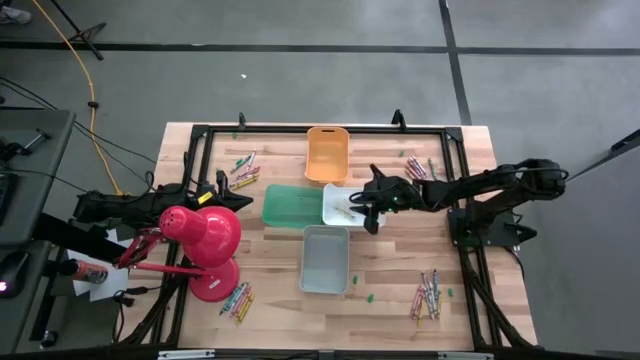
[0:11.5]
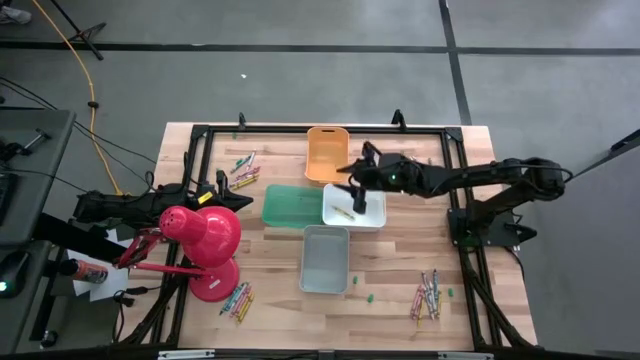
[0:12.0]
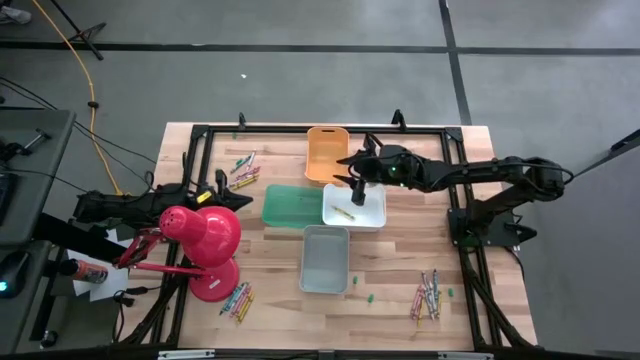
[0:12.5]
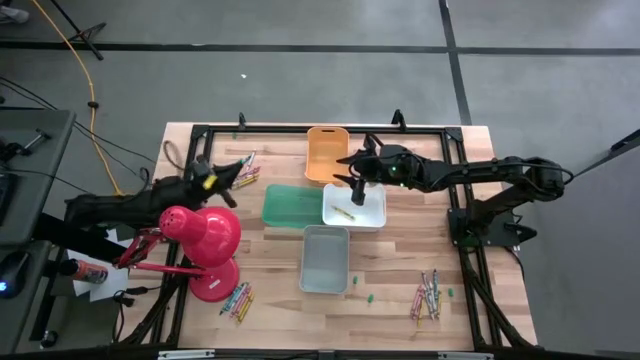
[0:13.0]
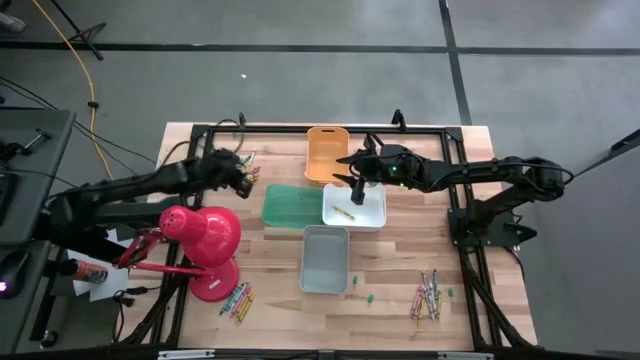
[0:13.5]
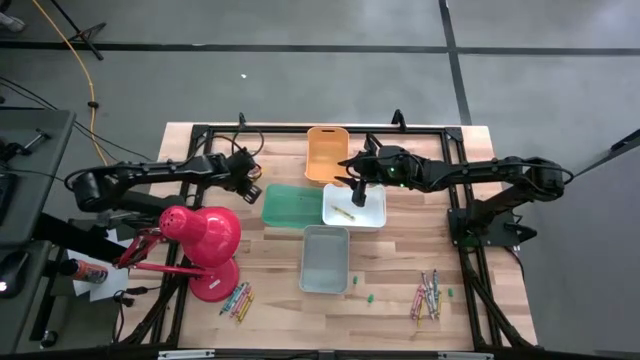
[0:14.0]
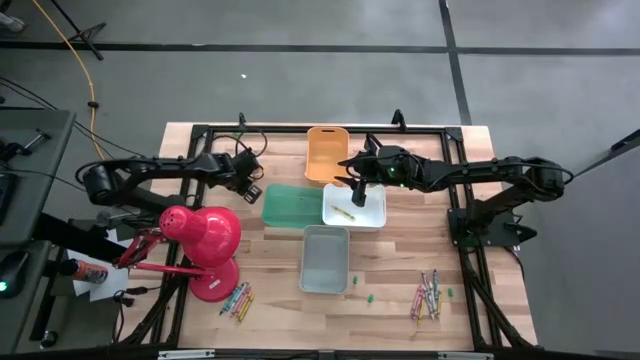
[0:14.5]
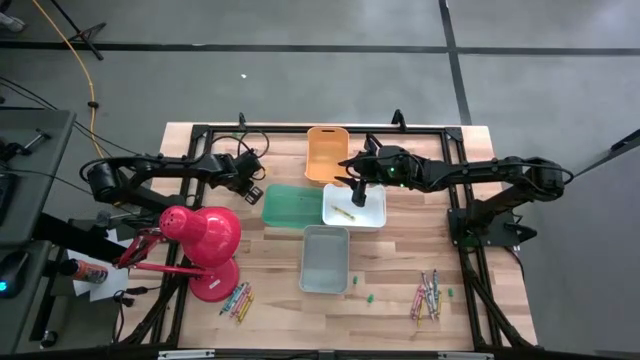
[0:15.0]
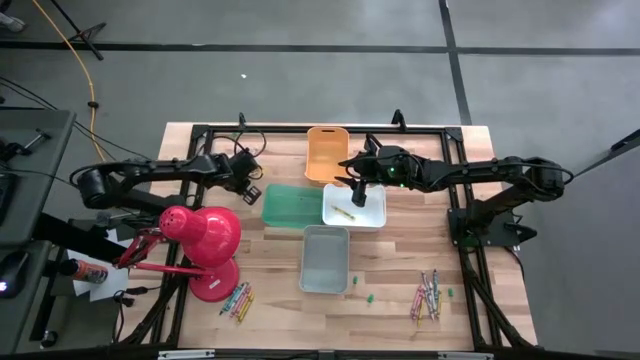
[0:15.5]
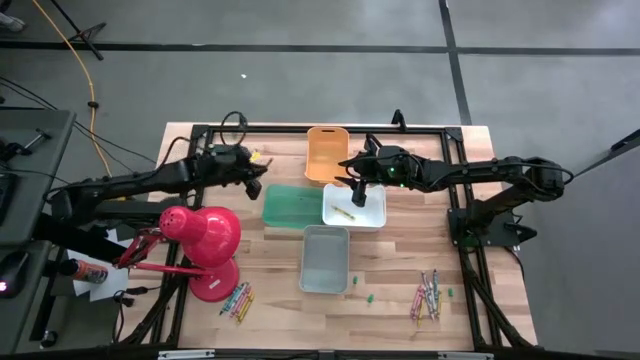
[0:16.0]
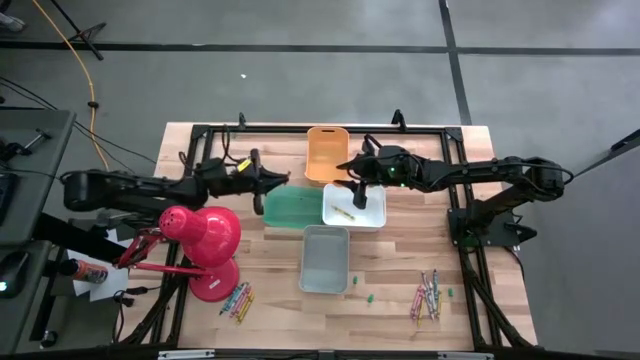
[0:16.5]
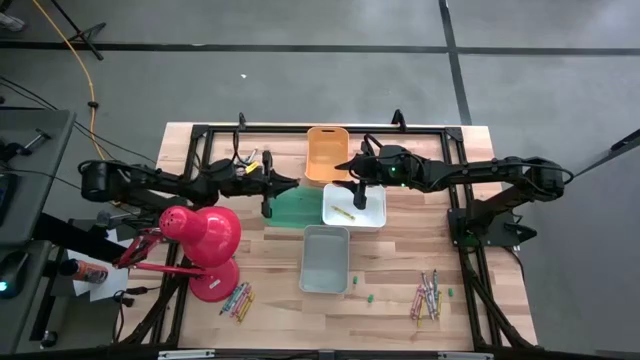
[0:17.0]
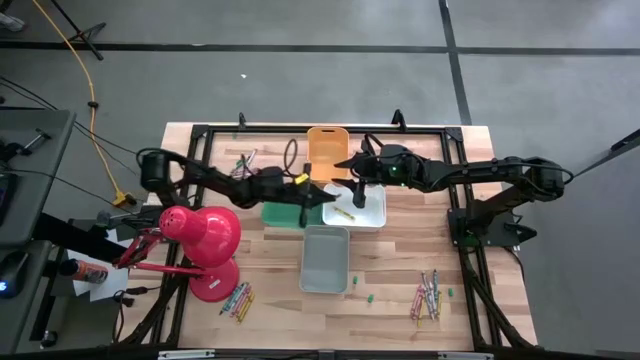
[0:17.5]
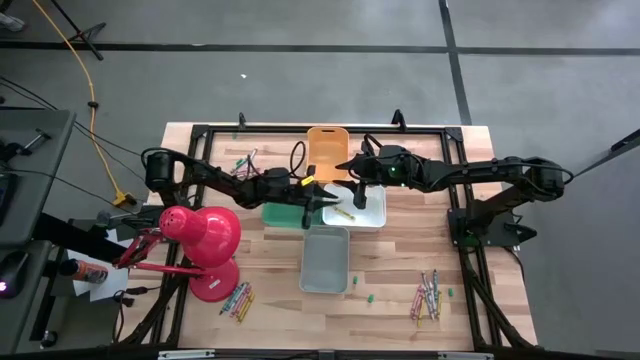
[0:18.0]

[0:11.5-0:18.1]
Task: Sort crayons
Put the yellow crayon into the white bin

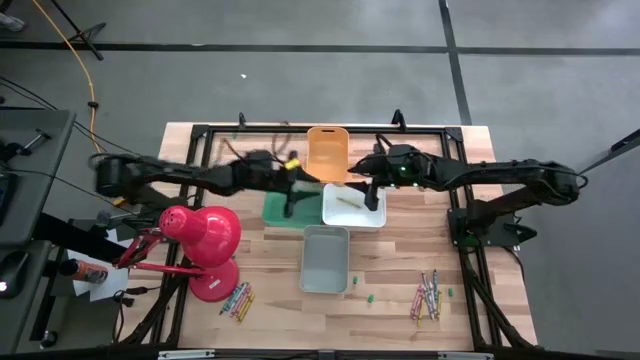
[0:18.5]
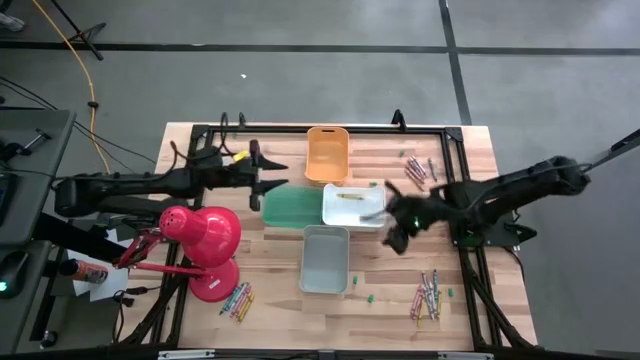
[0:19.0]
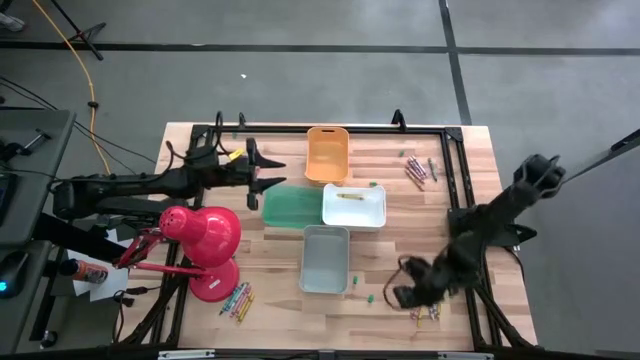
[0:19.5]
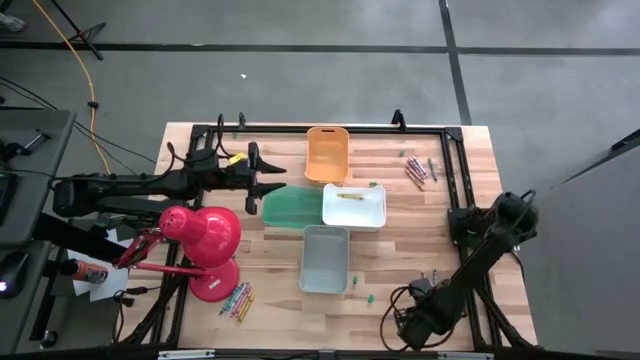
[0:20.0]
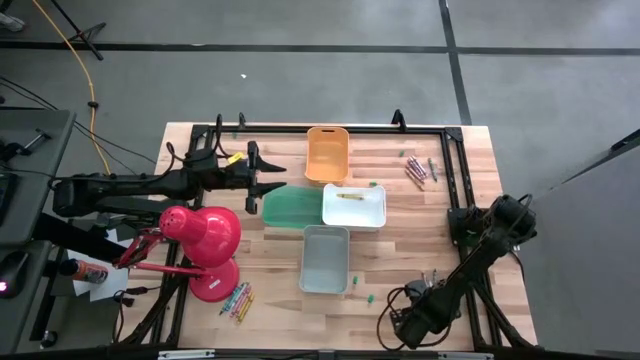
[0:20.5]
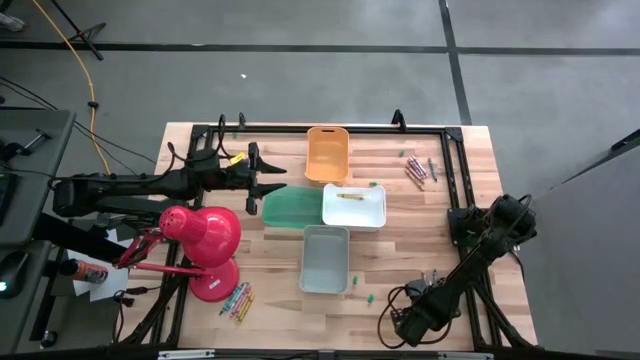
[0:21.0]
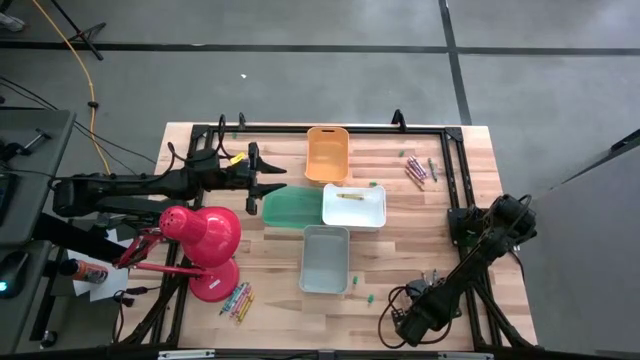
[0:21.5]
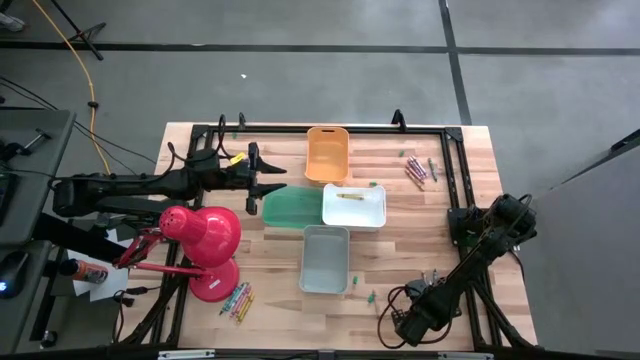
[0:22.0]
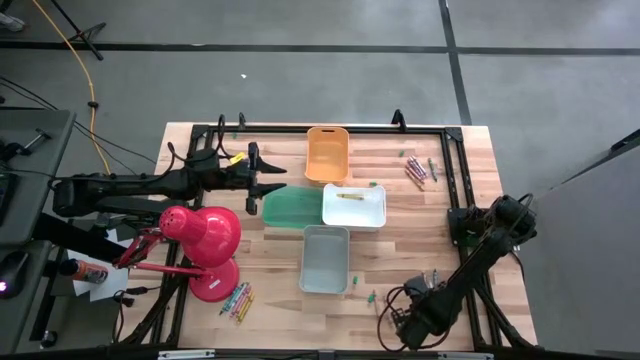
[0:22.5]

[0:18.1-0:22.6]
Put the yellow crayon into the white bin

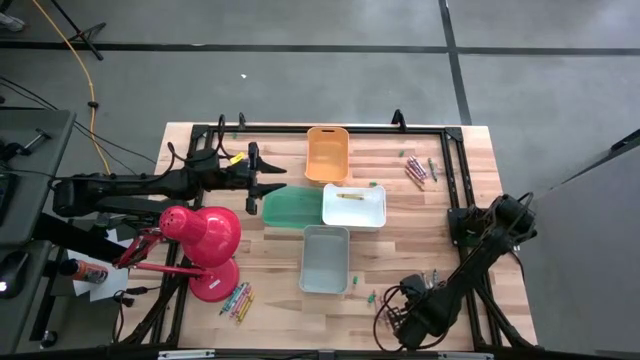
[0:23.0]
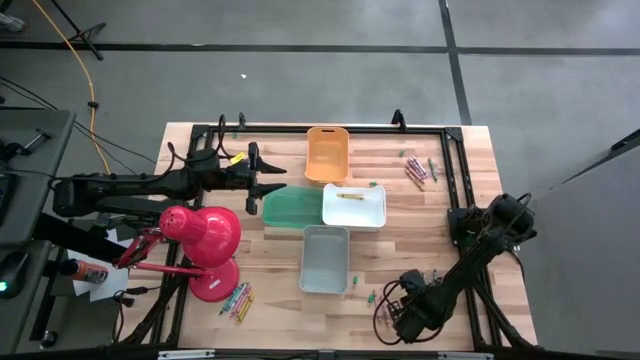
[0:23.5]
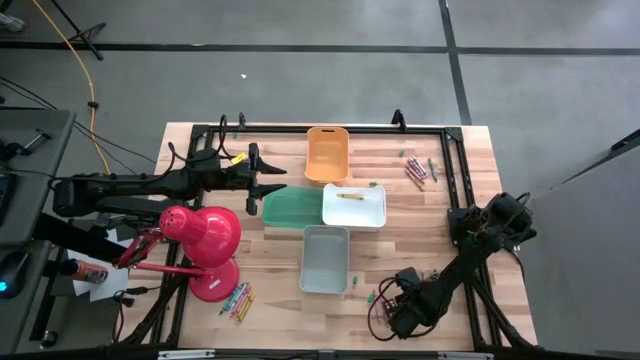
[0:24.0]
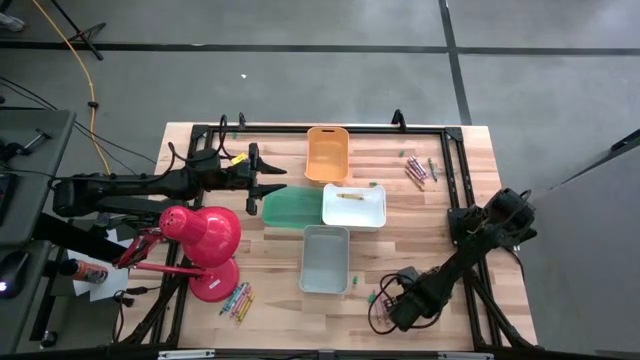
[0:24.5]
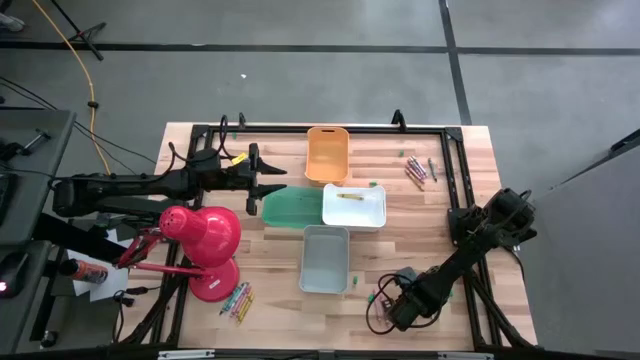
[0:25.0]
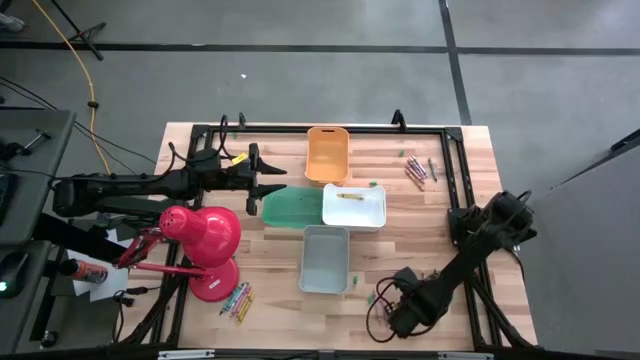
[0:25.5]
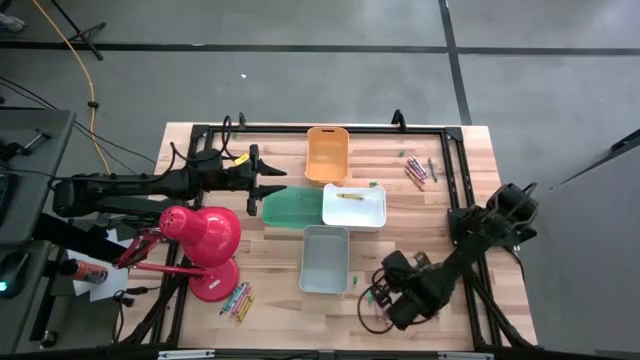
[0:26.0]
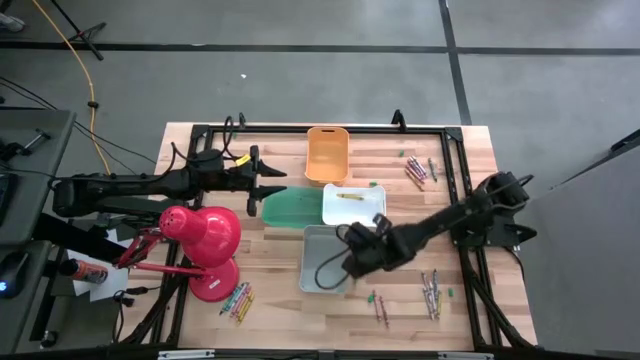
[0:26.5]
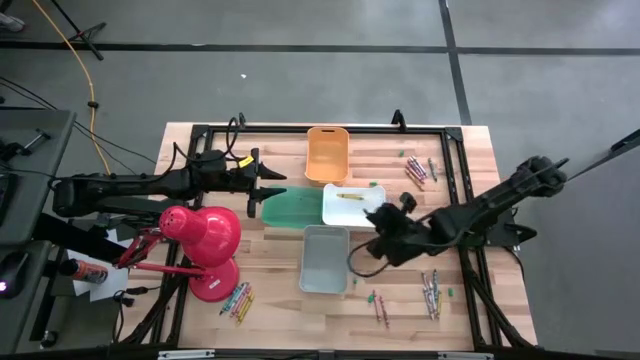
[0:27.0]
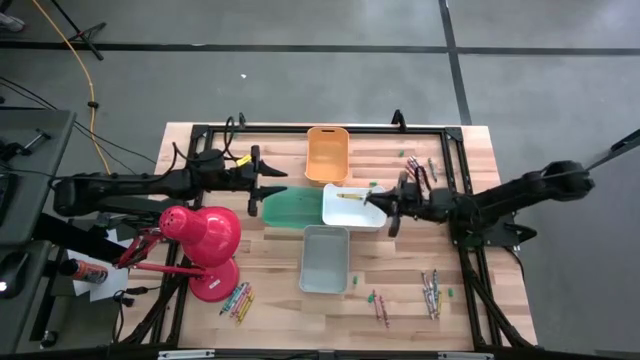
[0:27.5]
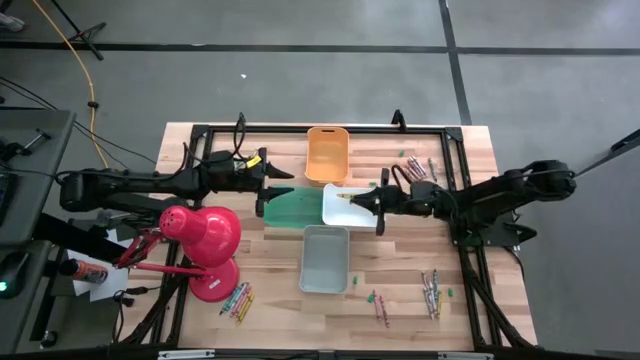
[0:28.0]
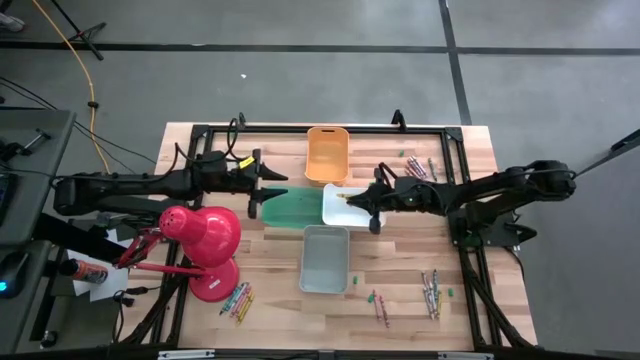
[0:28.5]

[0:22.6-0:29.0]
Put the yellow crayon into the white bin

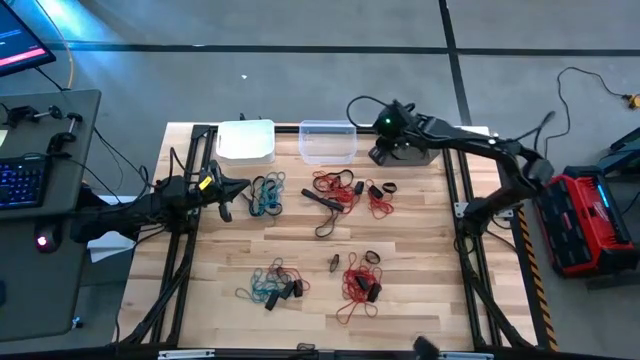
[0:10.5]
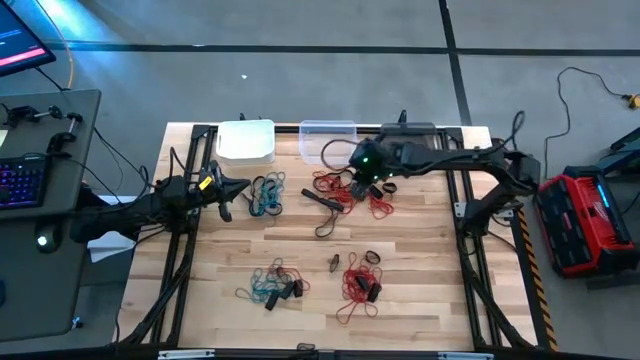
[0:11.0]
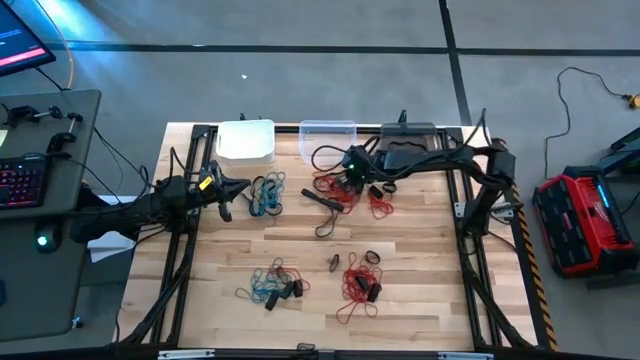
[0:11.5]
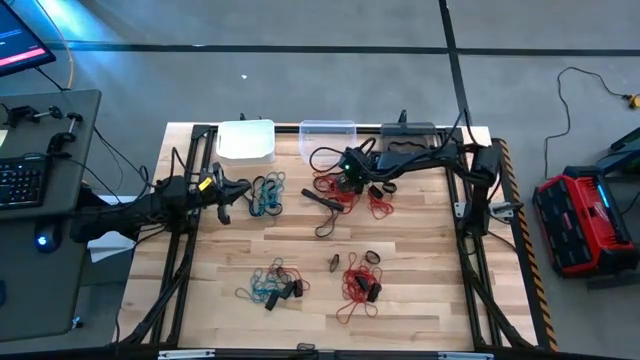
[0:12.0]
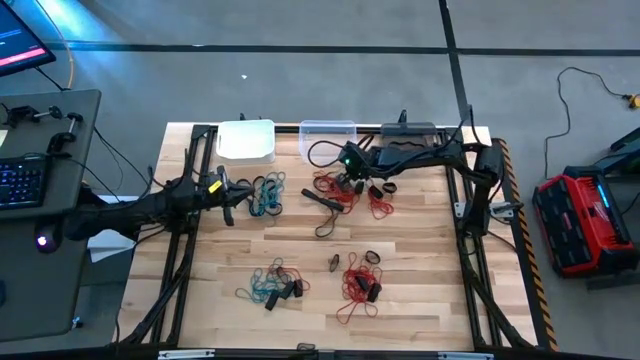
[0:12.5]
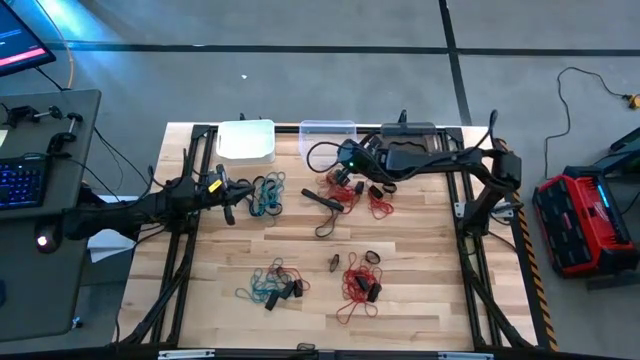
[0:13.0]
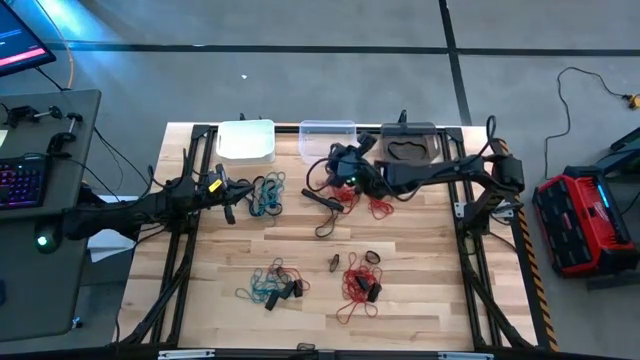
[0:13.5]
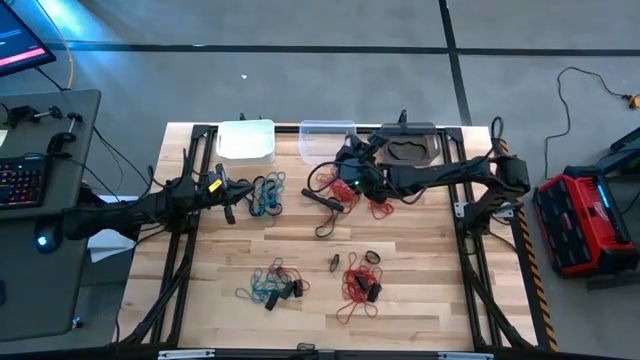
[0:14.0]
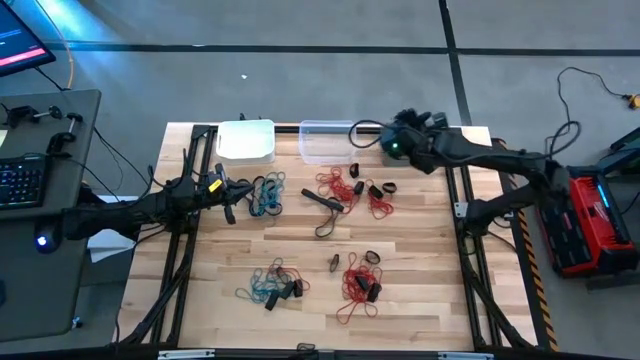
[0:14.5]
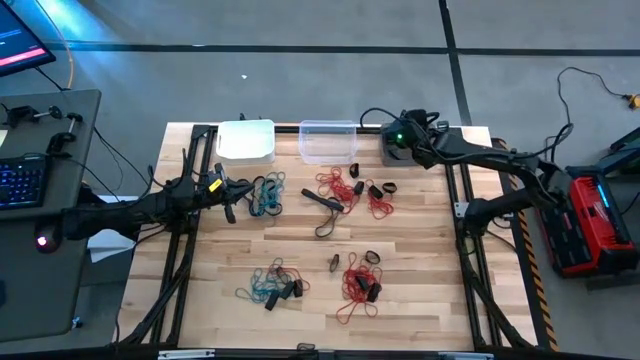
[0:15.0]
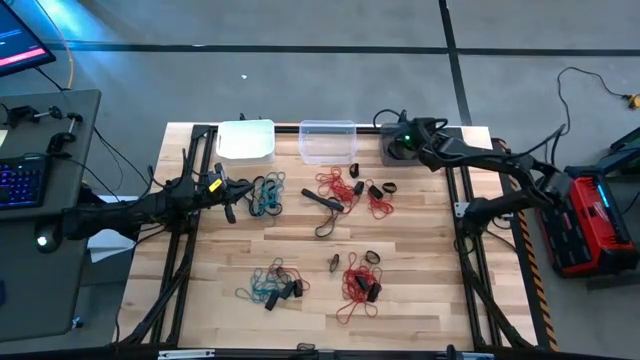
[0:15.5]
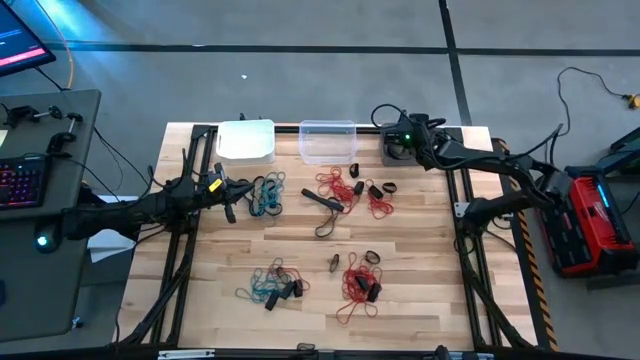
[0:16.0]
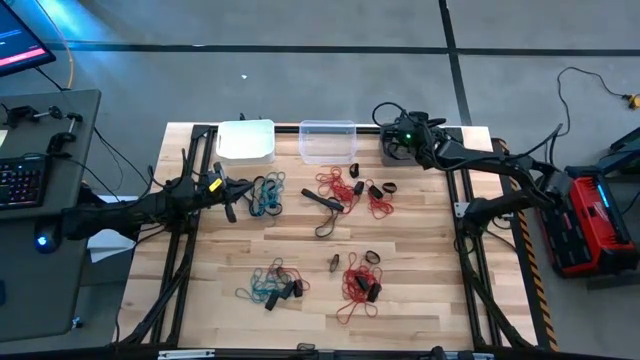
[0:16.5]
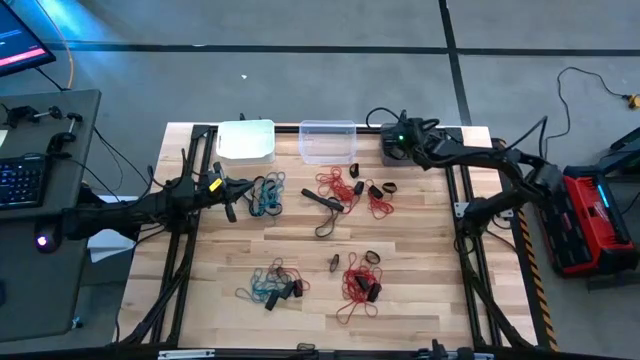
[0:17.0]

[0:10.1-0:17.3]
Task: Sort rubber bands into baskets
Put the black rubber band into the black bin
